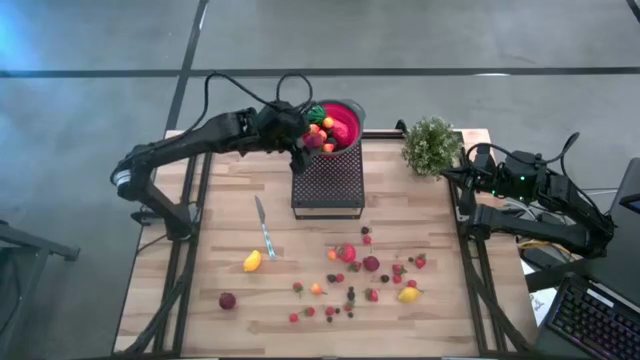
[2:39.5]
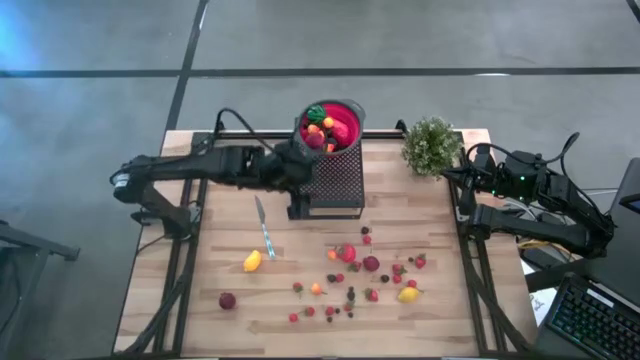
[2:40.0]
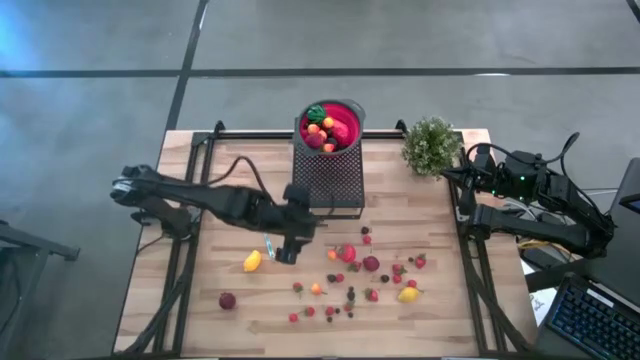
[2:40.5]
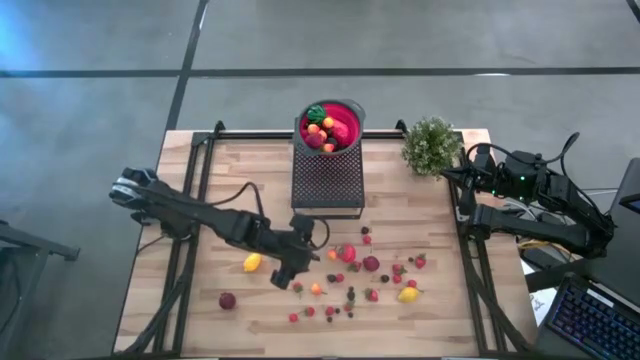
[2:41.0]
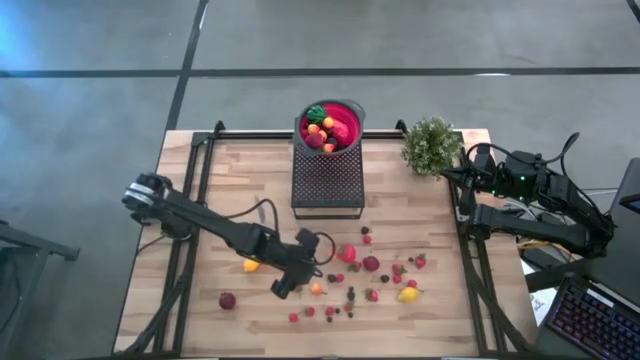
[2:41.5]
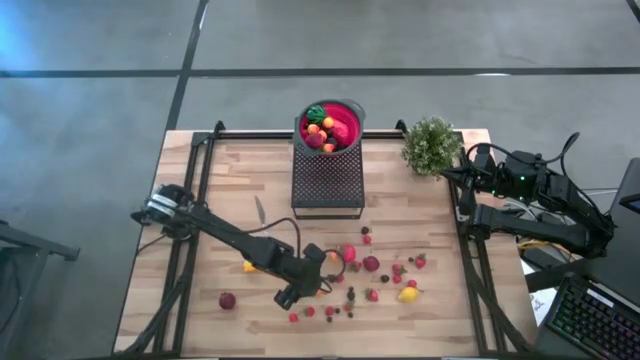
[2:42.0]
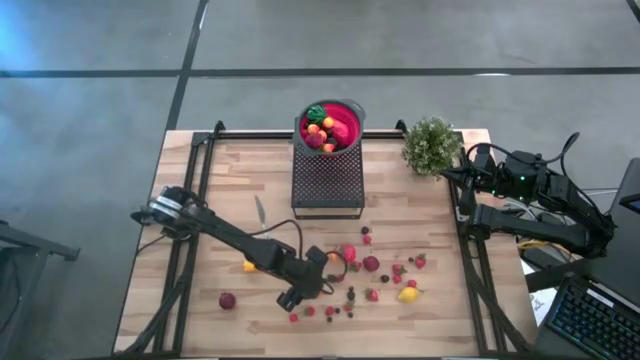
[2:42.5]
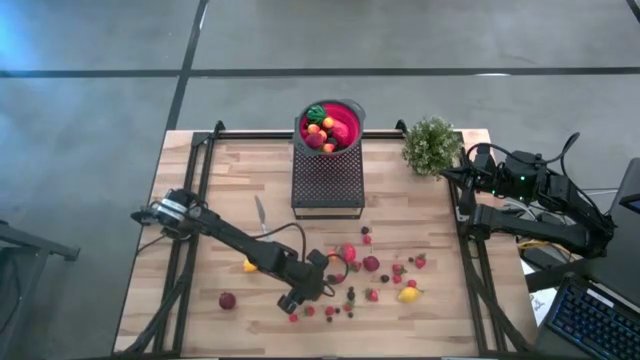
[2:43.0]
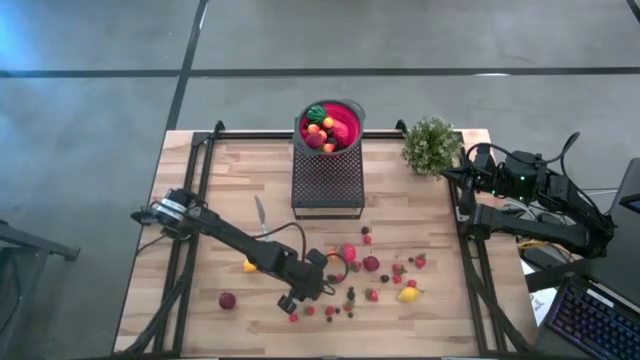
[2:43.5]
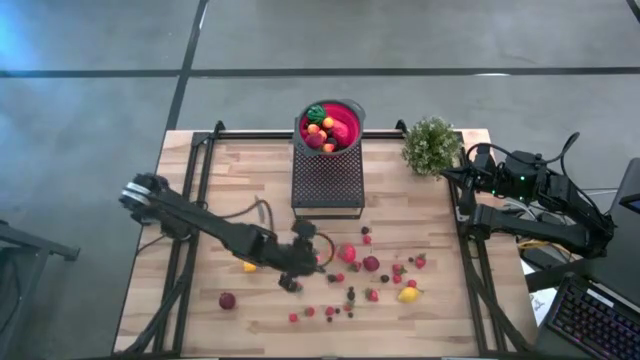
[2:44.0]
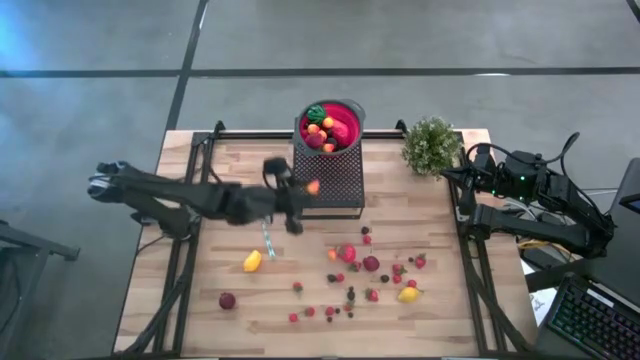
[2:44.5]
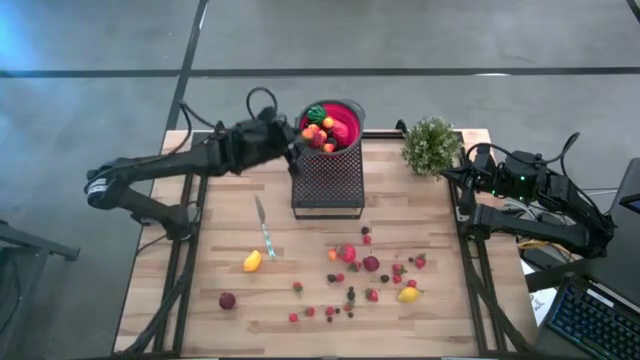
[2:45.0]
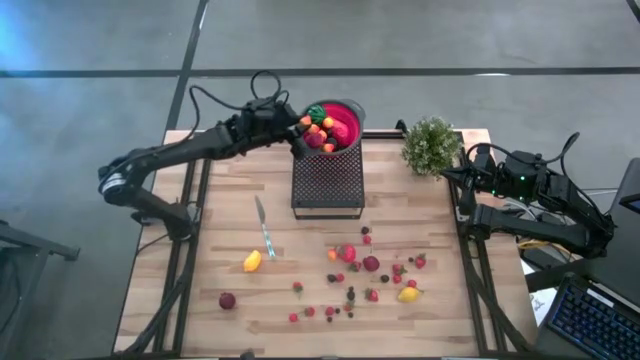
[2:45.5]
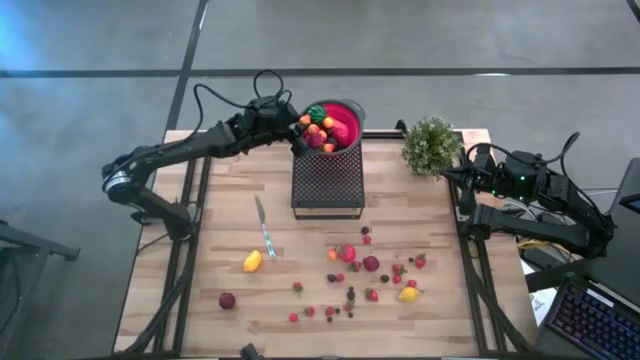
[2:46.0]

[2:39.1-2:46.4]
Task: Pick & Place Fruit
Put the bottom pear into the strainer bowl on the shelf

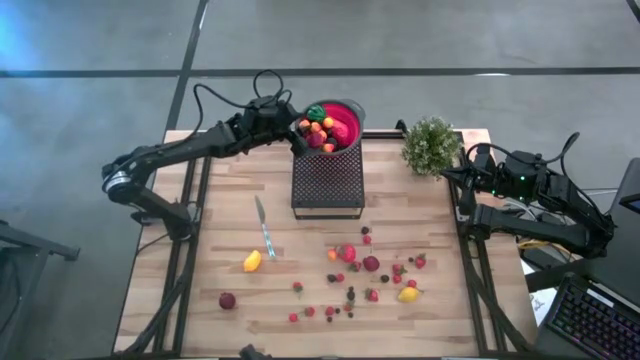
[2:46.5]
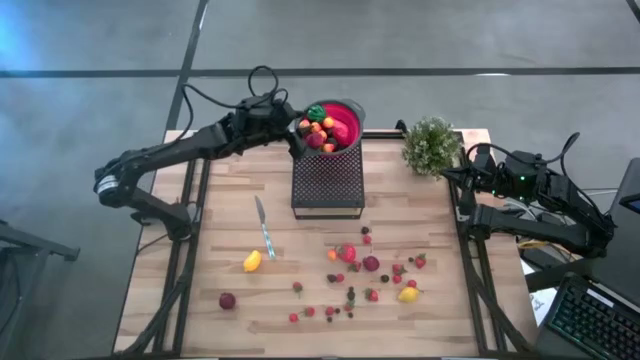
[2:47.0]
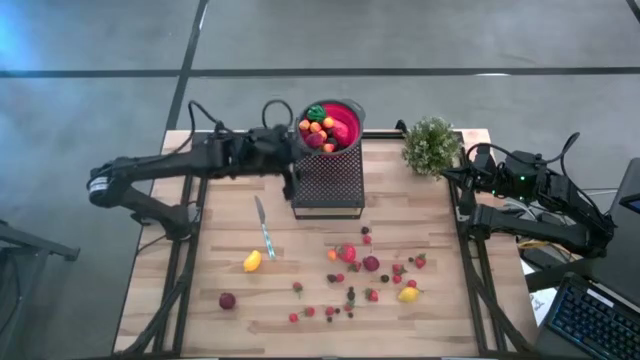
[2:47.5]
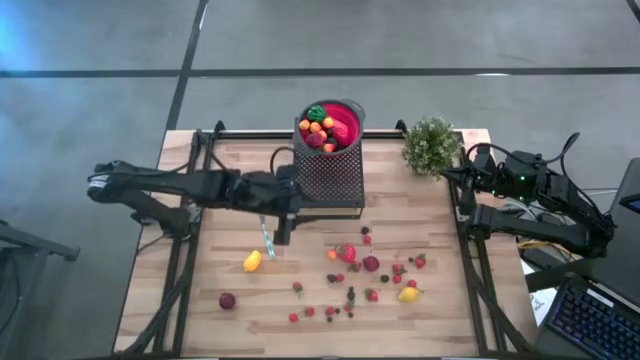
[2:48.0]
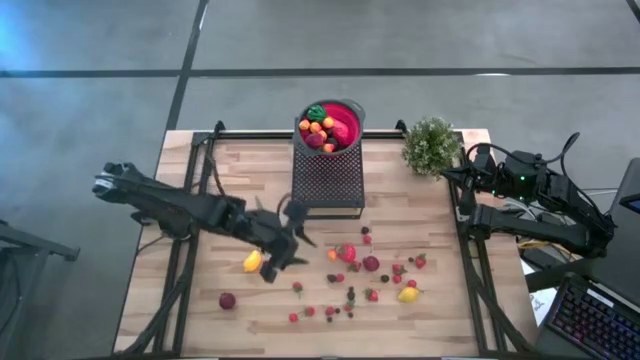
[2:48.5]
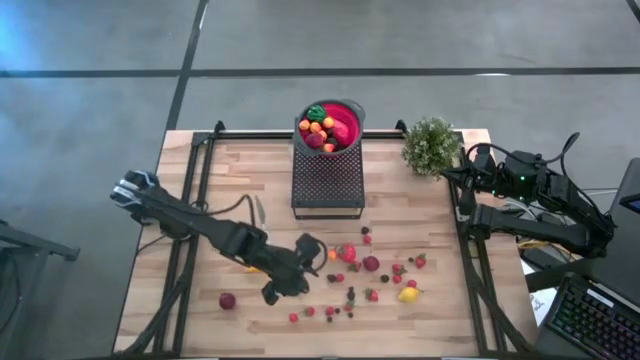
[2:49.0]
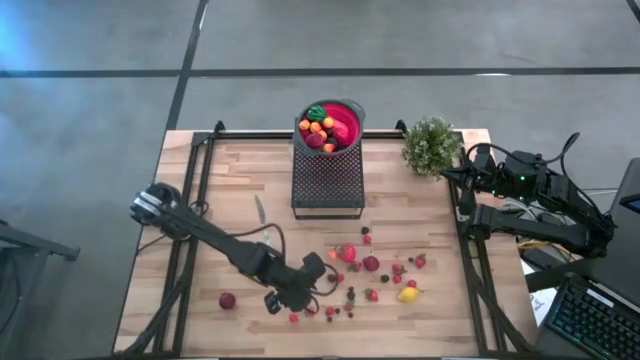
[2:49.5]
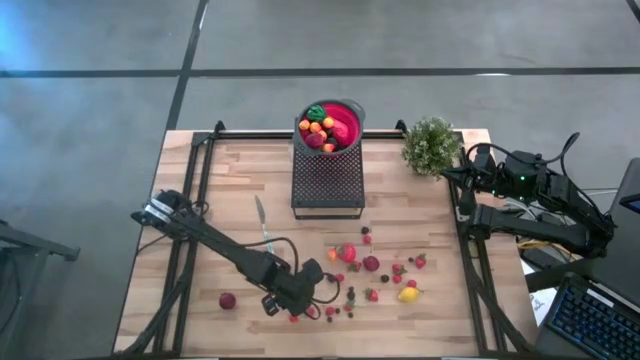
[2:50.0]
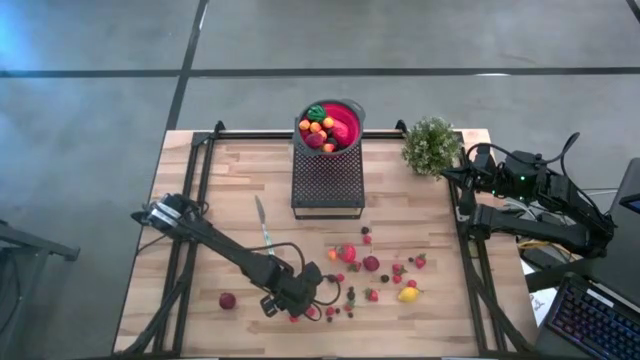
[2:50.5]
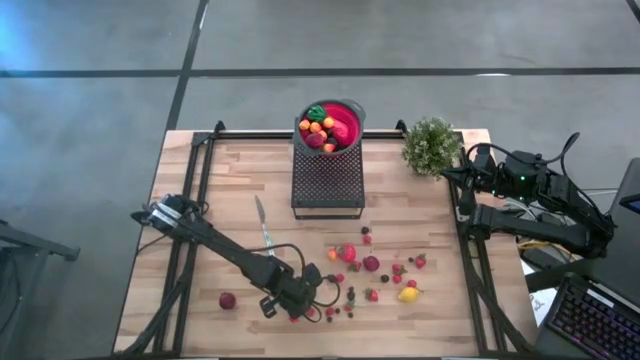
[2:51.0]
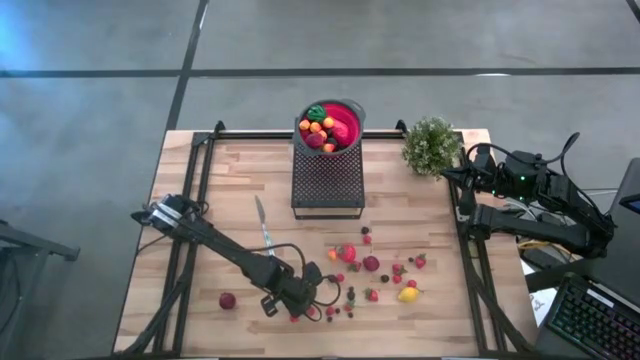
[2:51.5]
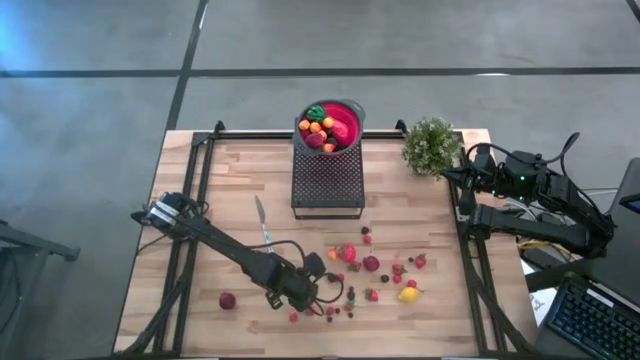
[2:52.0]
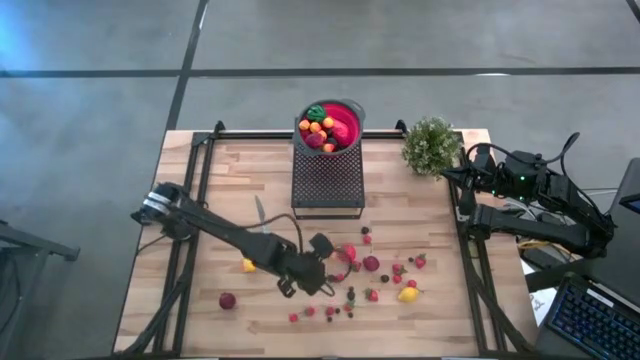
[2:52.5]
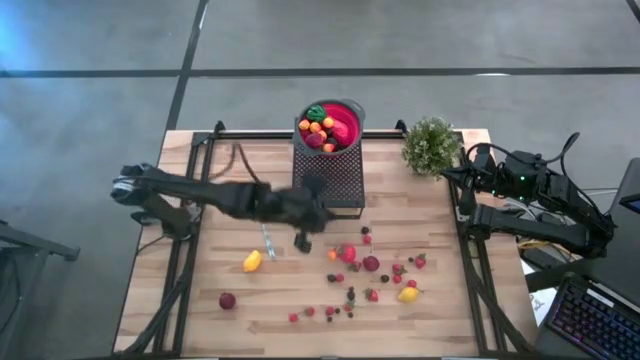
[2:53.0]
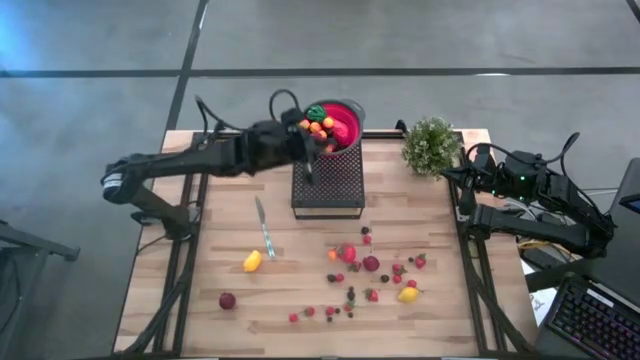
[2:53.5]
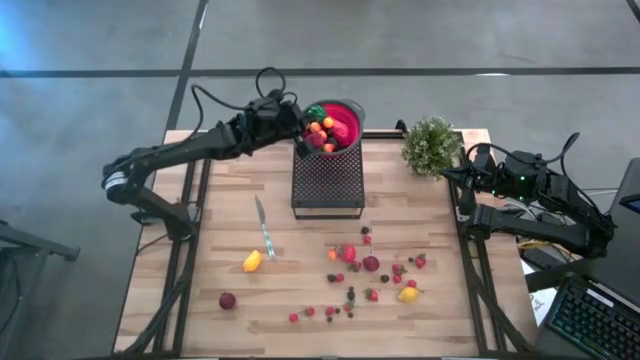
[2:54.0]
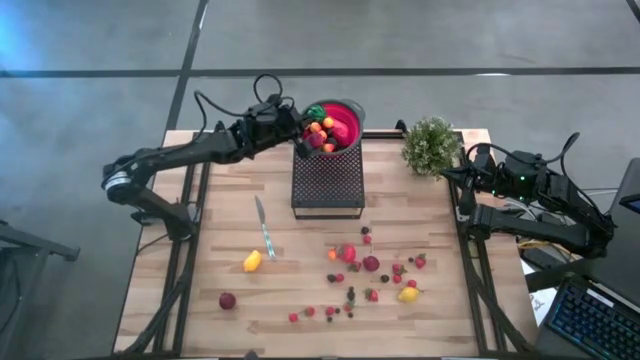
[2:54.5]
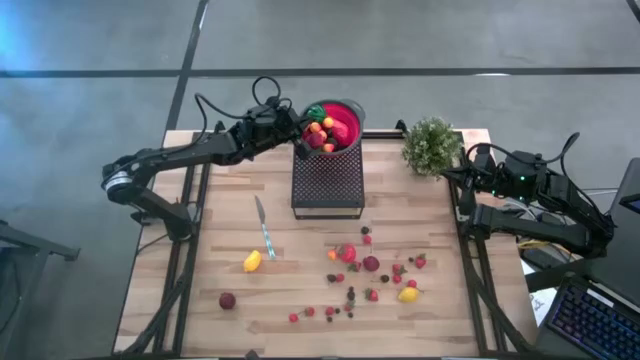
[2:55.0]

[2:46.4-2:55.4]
Put the strawberry into the strainer bowl on the shelf

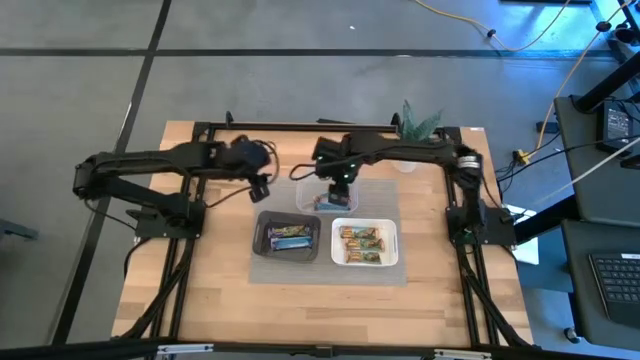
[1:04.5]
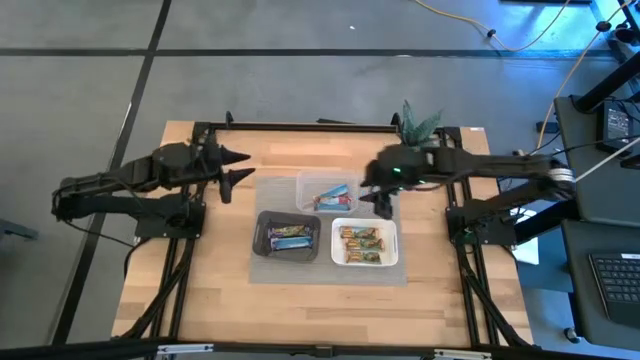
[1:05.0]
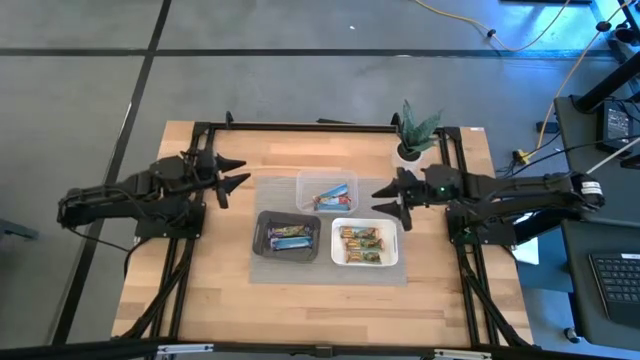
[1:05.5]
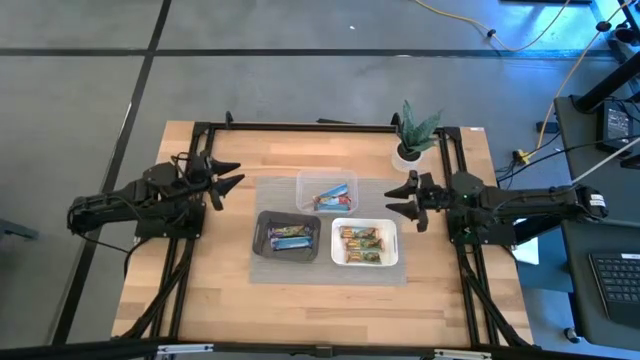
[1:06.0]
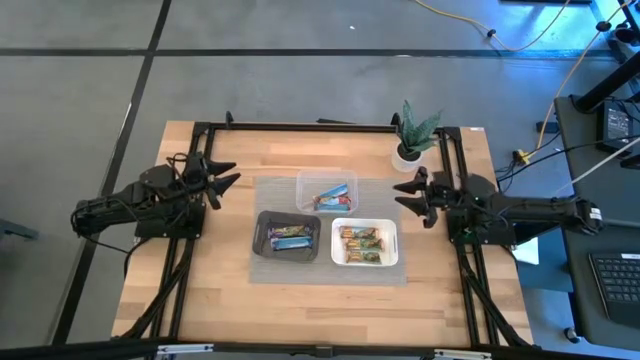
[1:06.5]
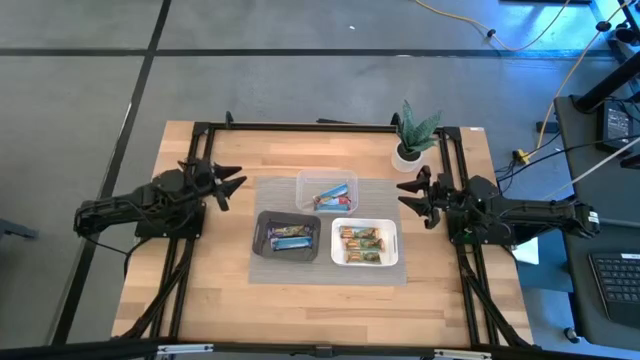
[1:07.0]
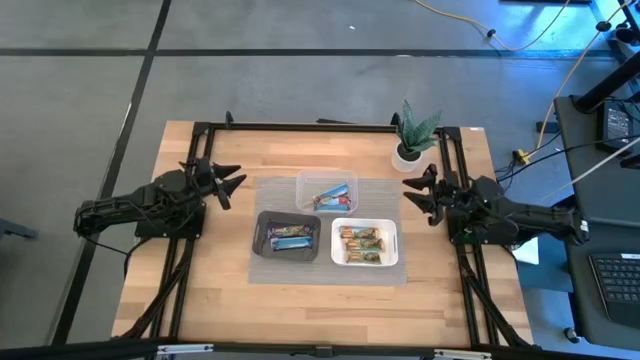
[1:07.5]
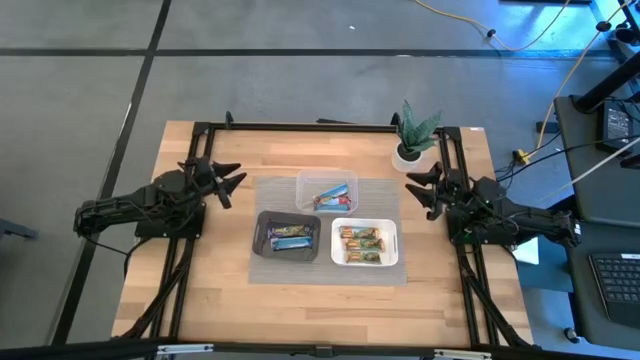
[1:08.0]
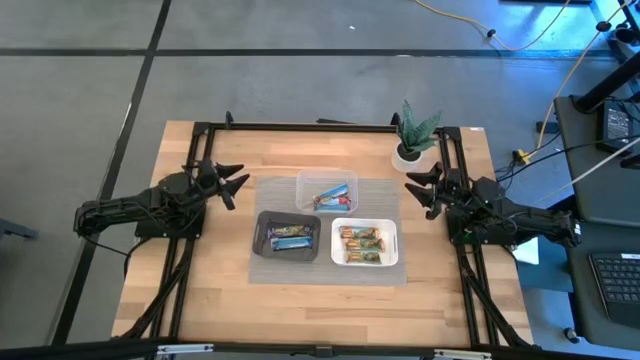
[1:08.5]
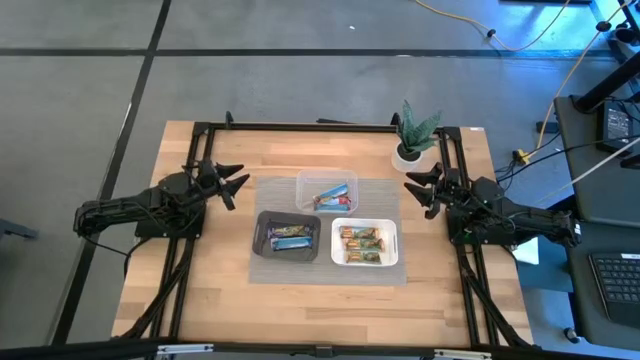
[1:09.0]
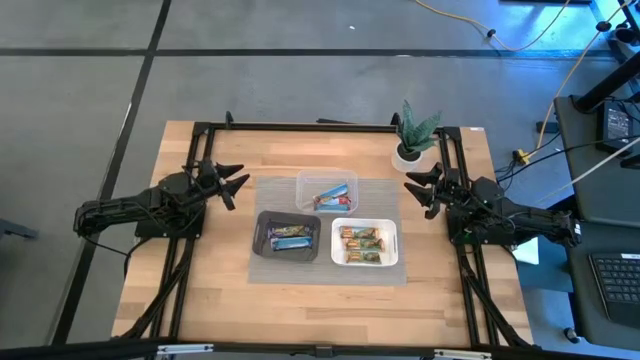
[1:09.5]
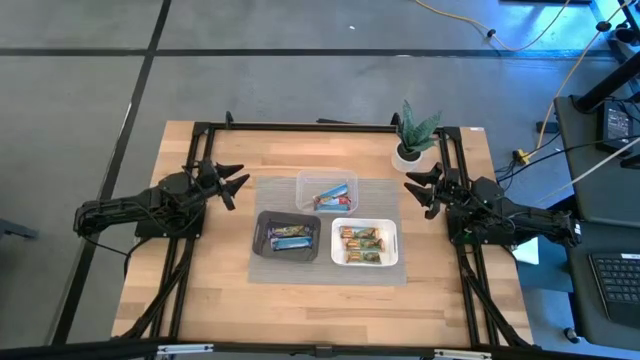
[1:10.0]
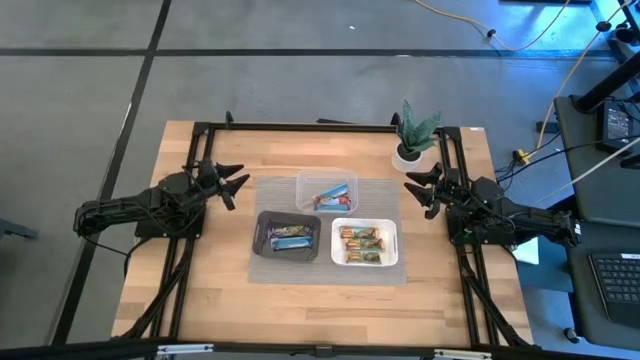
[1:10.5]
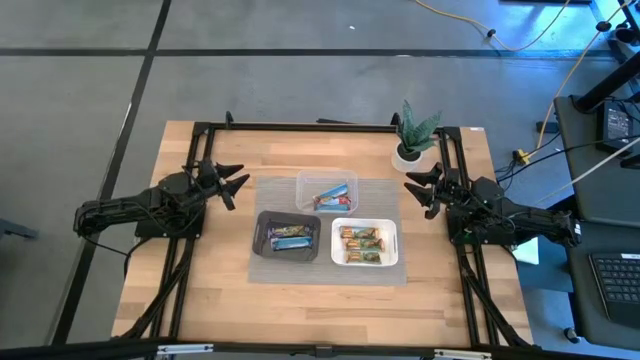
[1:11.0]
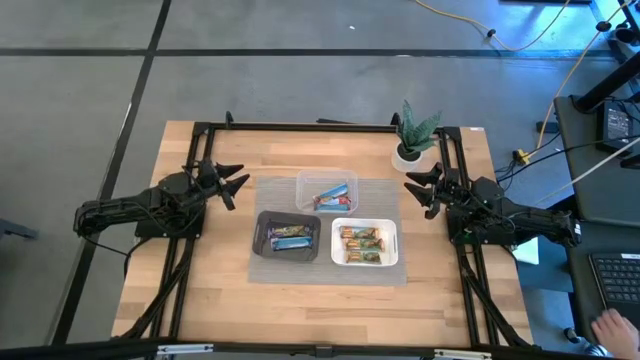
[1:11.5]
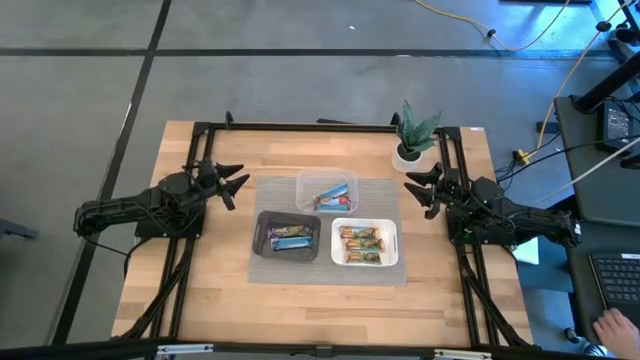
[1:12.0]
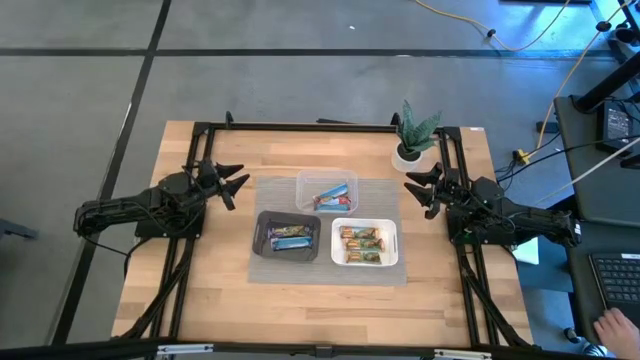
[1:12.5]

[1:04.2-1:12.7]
Task: Pick and place Granola Bars by type
Return to Home Position
